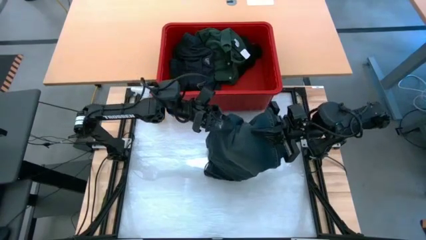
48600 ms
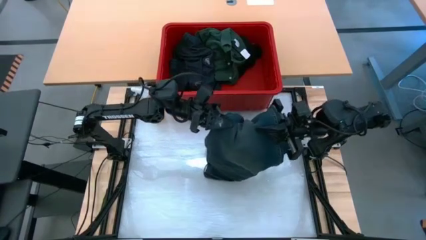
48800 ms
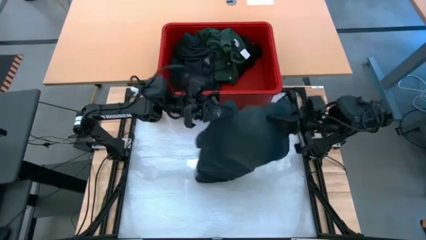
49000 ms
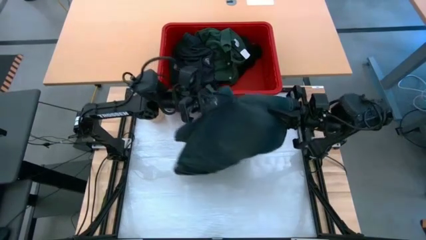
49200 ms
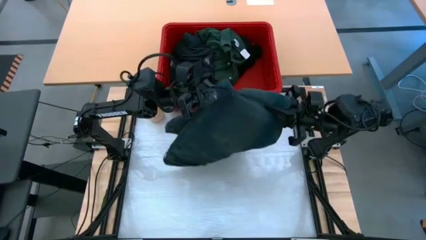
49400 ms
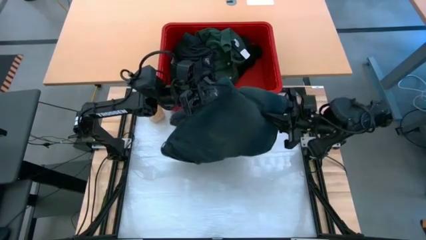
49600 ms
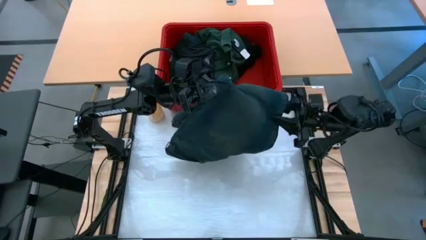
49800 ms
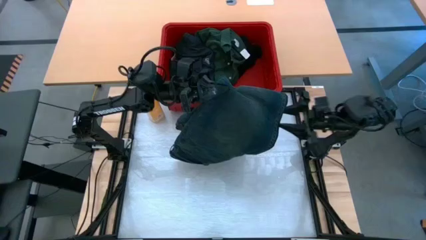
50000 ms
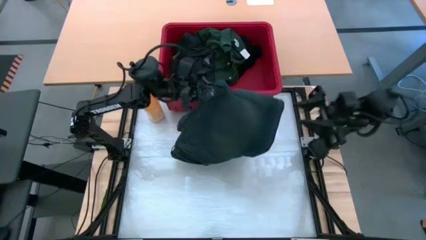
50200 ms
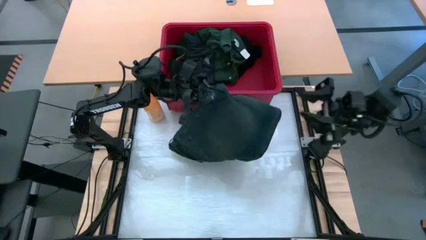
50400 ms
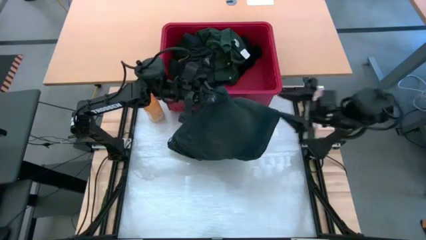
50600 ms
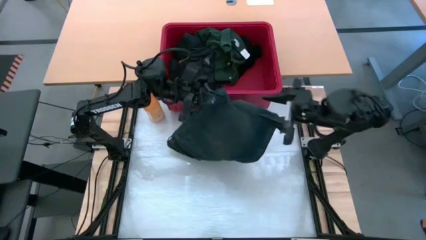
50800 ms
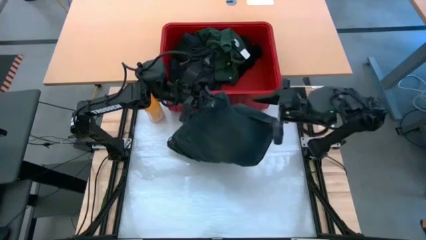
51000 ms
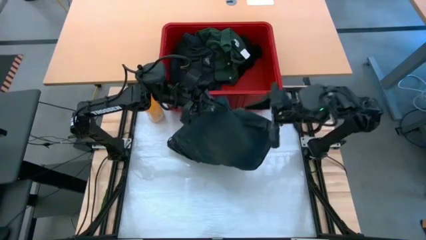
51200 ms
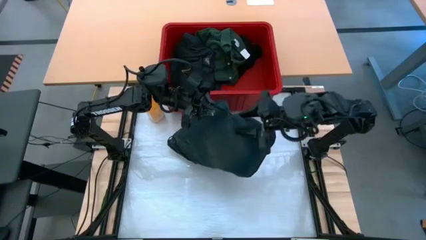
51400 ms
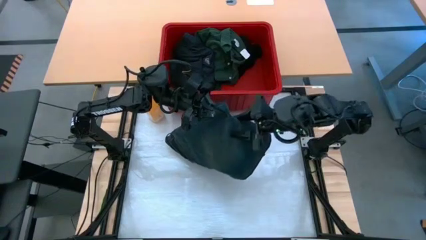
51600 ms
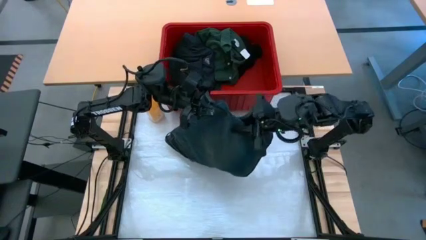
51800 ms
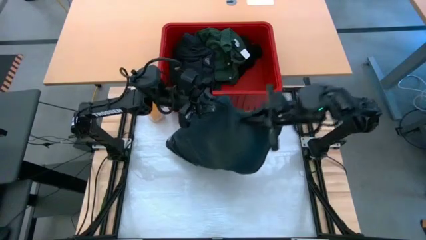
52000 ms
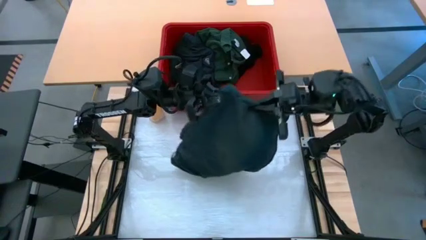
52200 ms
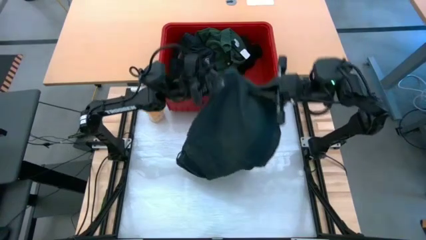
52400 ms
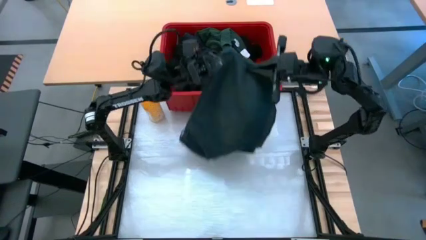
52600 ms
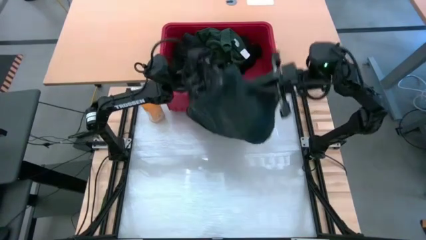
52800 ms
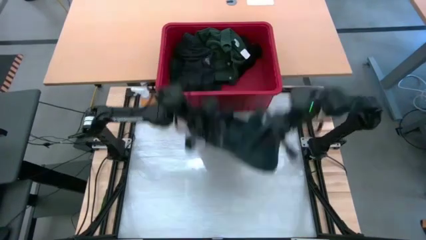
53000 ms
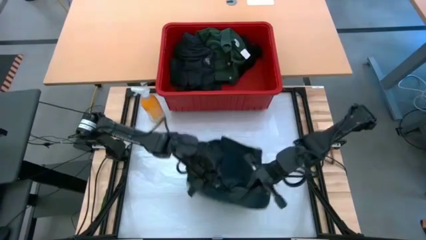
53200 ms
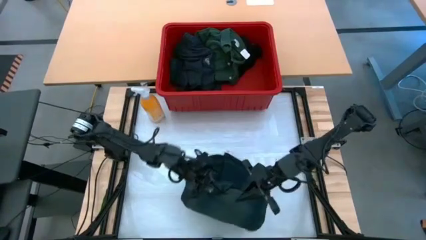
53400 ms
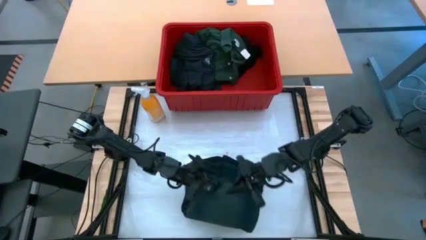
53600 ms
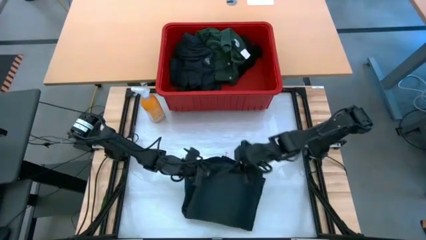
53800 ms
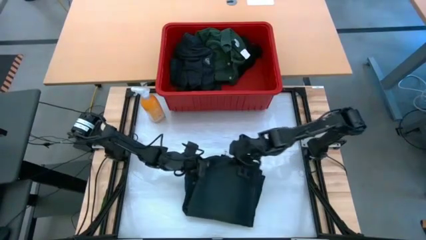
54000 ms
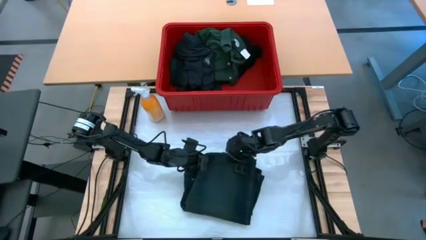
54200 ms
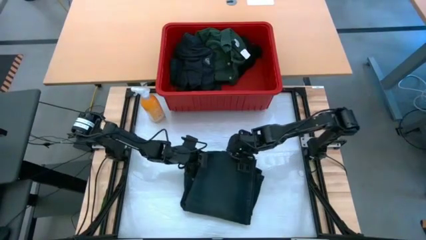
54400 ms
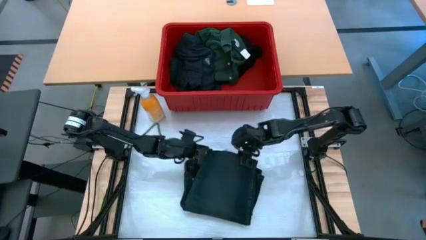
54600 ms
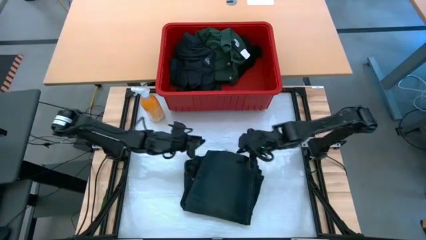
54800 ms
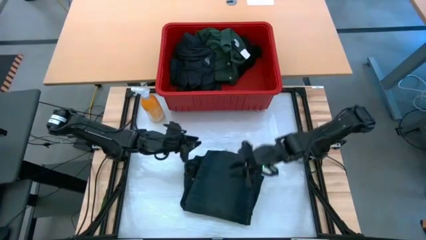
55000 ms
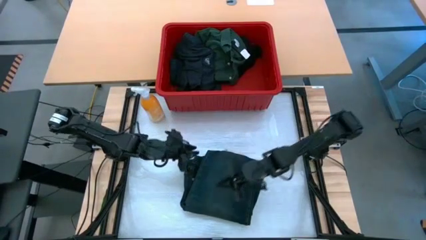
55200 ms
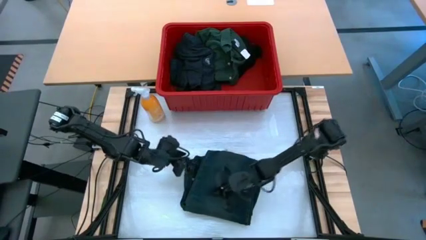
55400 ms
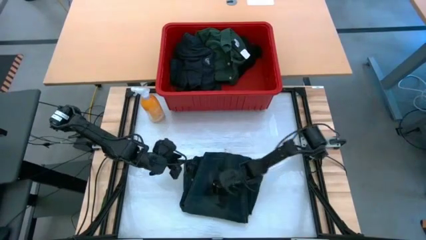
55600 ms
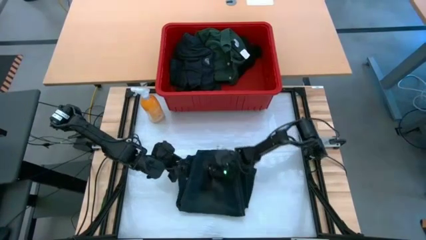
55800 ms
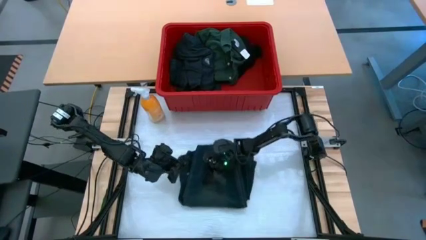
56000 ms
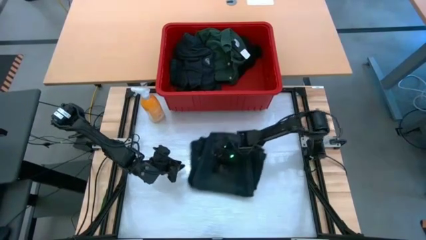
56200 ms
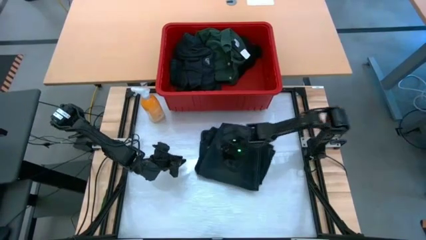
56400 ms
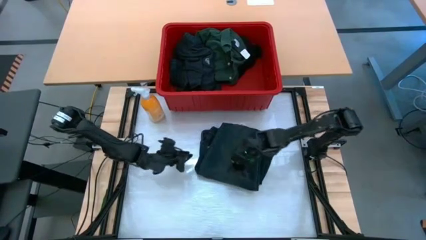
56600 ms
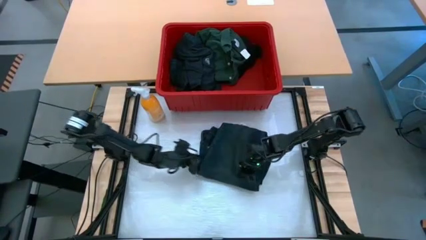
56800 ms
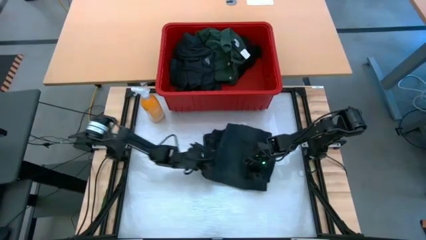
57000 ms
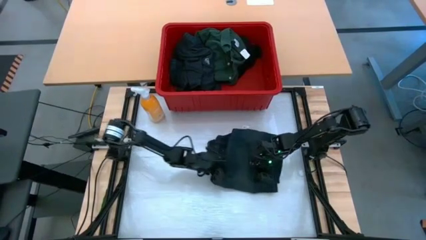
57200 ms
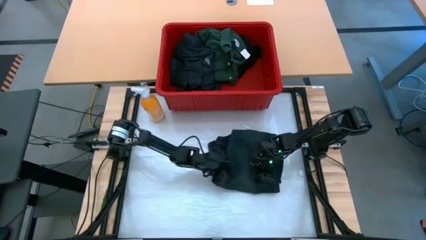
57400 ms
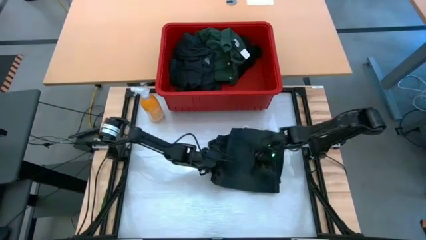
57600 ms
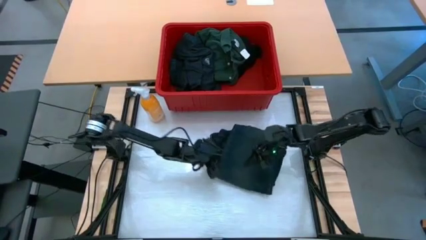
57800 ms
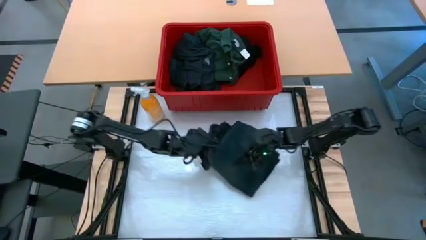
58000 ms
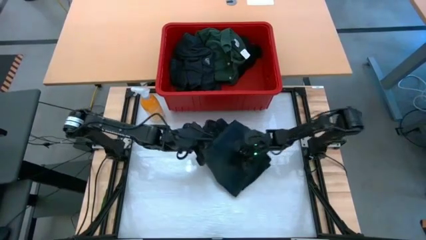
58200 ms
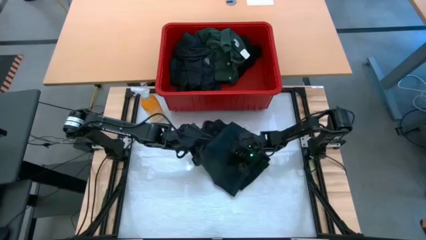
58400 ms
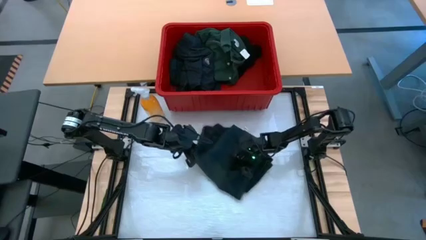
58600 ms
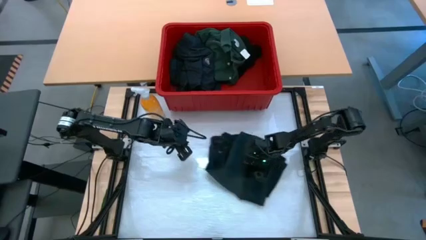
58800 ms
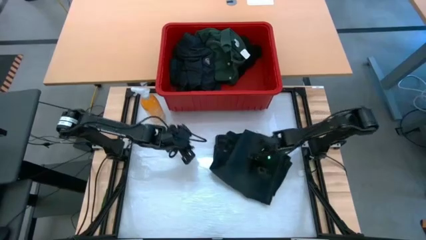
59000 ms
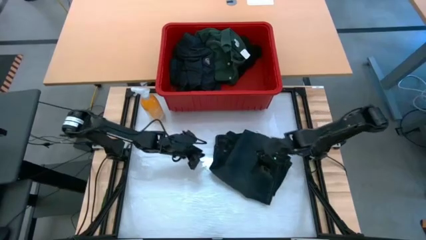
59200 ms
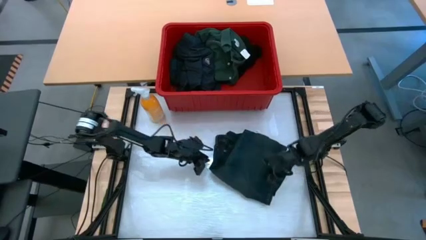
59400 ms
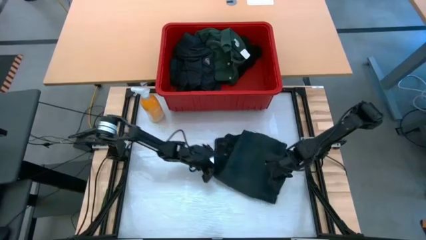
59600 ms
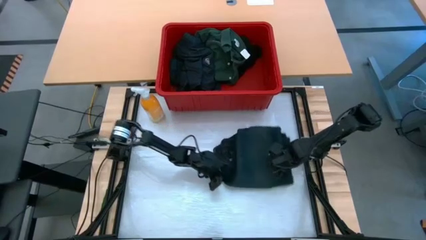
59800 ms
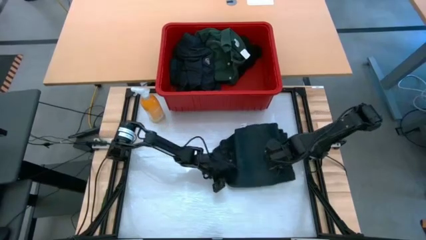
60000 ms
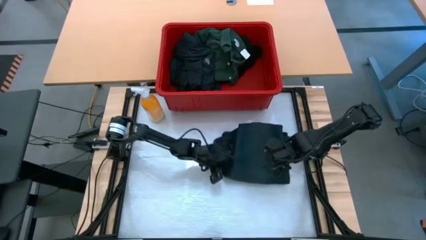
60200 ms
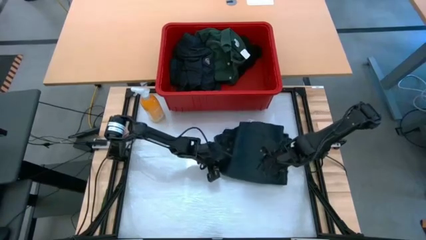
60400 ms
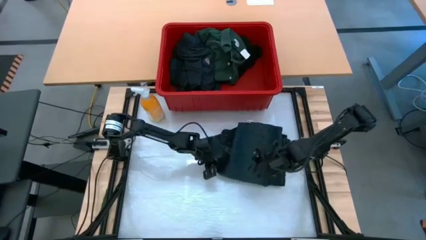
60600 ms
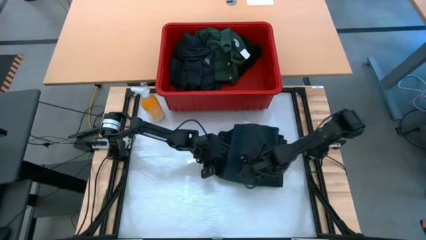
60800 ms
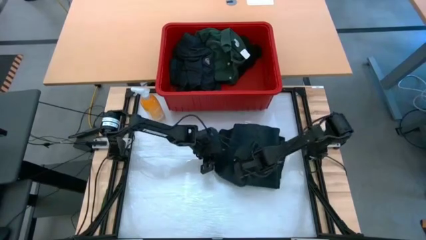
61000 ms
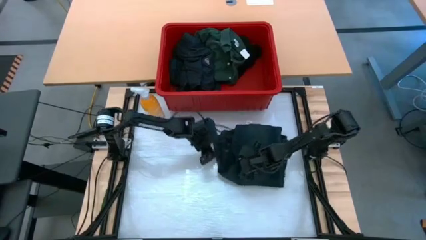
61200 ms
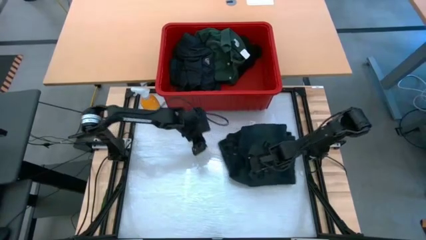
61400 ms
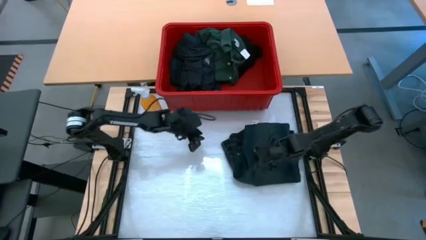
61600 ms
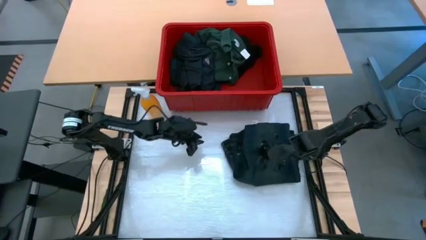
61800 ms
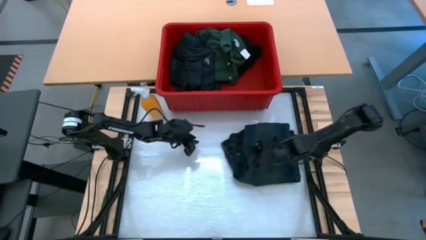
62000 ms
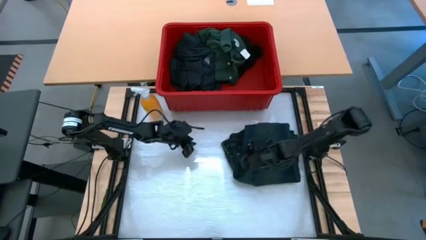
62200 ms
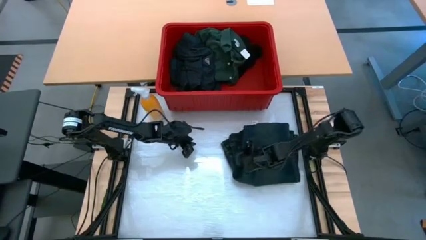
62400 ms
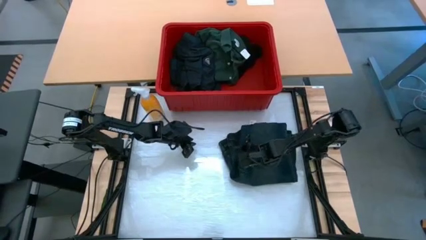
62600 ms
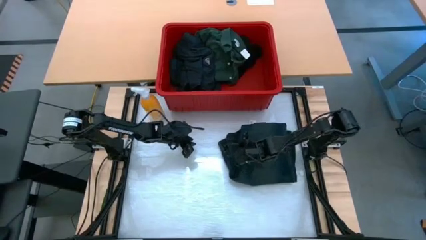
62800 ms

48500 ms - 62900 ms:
Task: Fold laundry
Fold the blue pants
